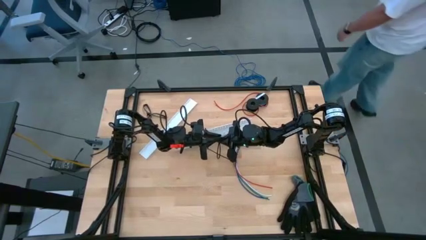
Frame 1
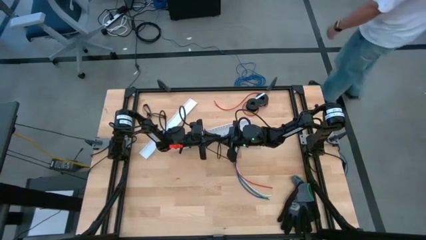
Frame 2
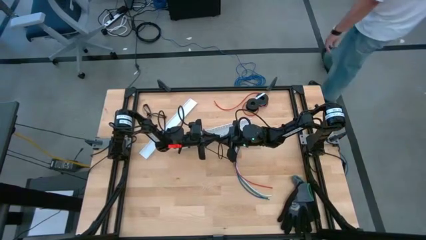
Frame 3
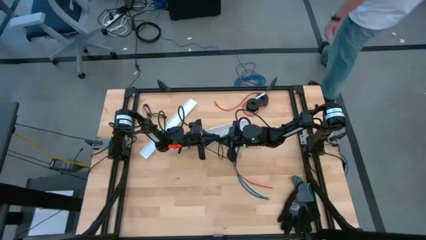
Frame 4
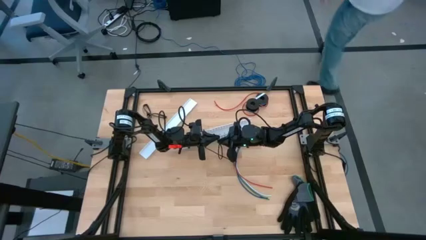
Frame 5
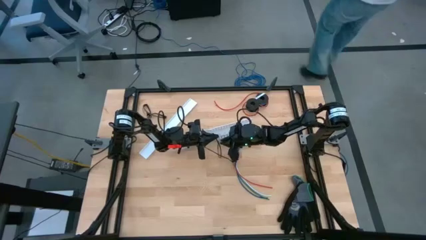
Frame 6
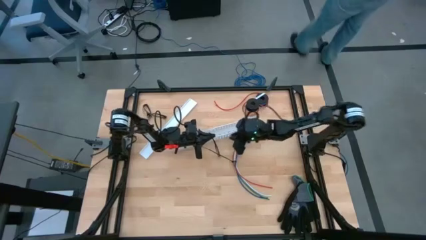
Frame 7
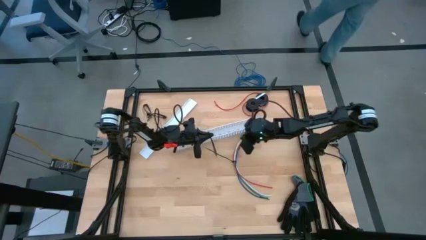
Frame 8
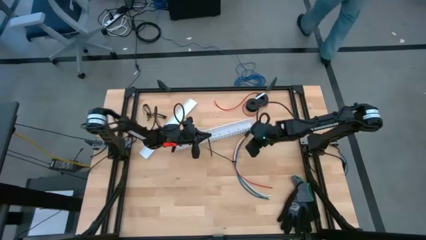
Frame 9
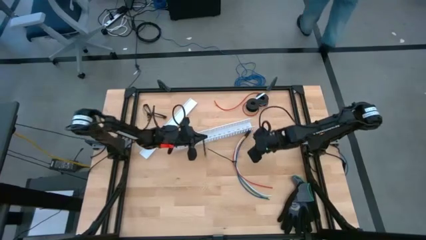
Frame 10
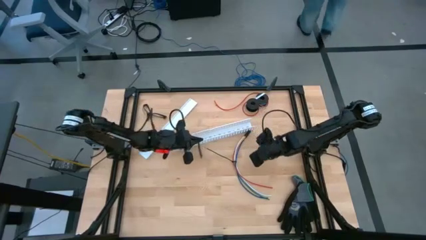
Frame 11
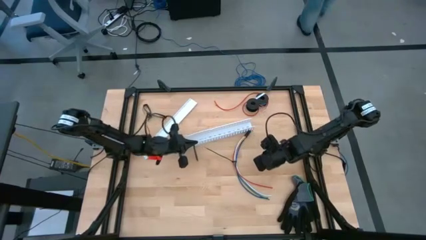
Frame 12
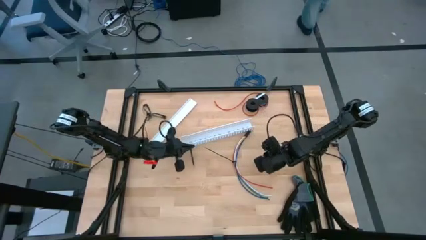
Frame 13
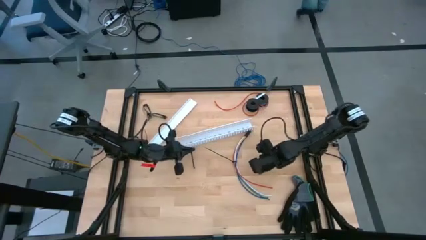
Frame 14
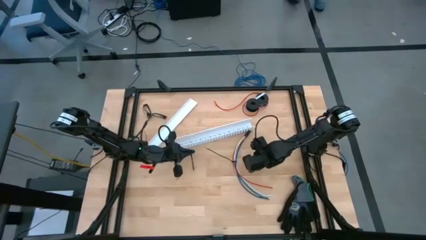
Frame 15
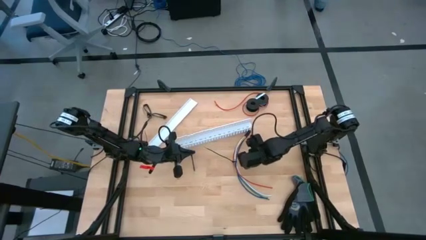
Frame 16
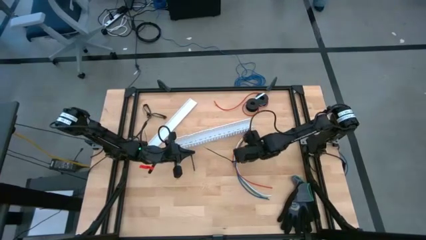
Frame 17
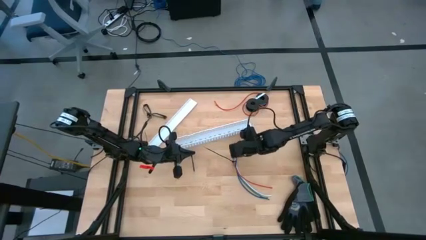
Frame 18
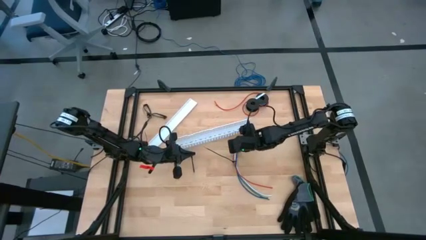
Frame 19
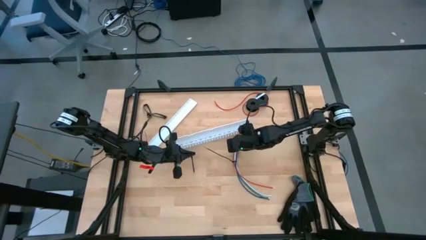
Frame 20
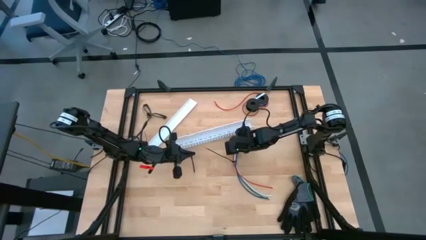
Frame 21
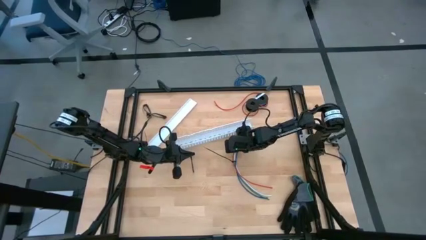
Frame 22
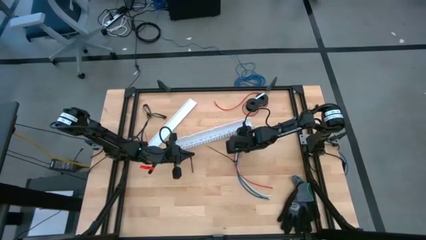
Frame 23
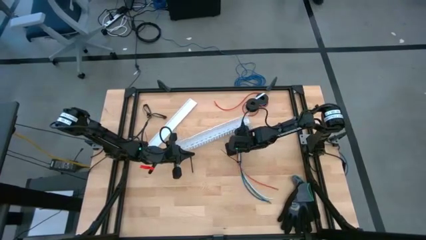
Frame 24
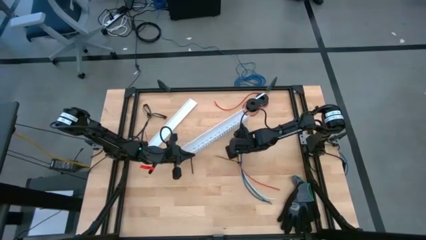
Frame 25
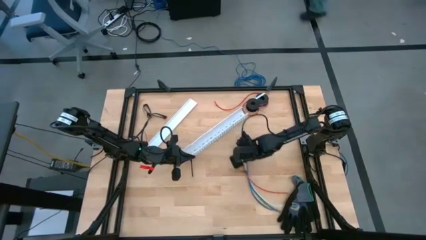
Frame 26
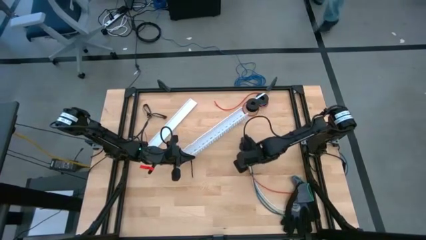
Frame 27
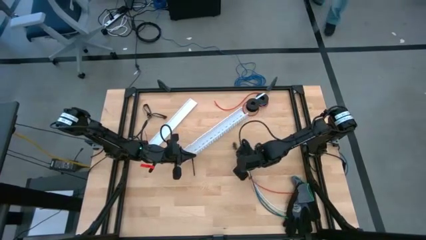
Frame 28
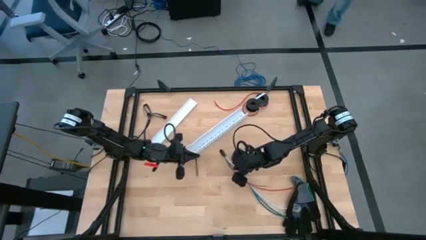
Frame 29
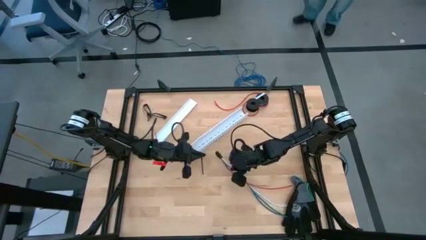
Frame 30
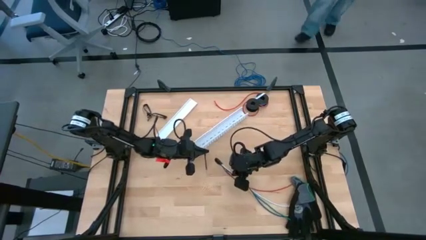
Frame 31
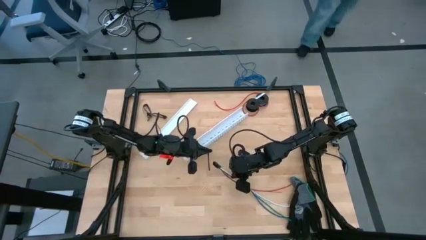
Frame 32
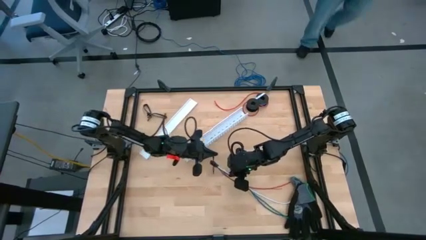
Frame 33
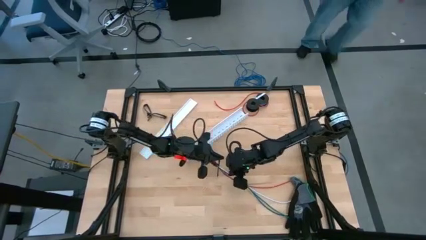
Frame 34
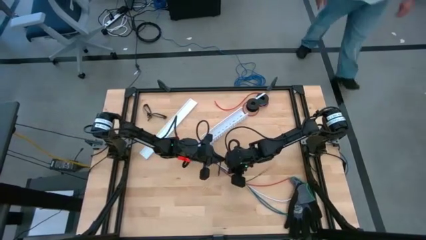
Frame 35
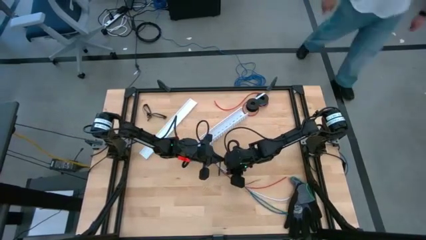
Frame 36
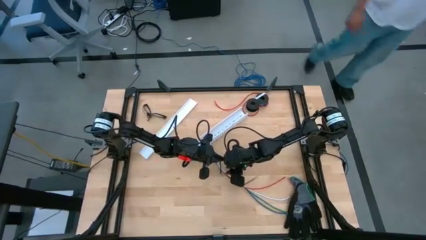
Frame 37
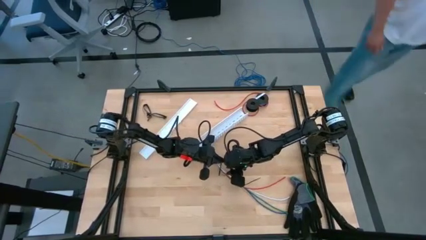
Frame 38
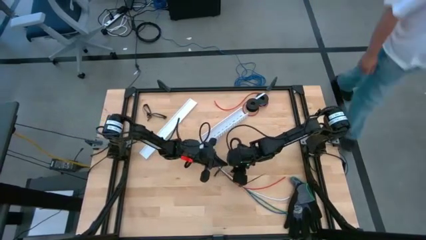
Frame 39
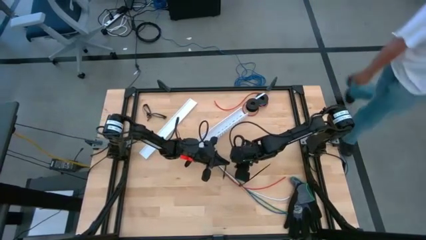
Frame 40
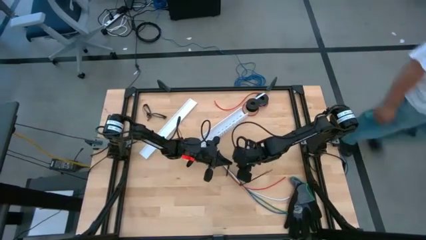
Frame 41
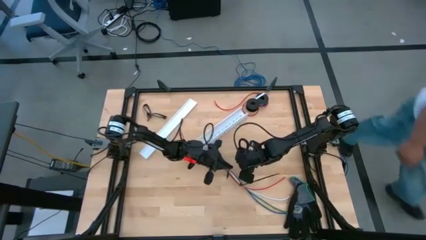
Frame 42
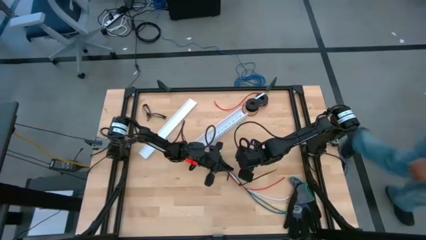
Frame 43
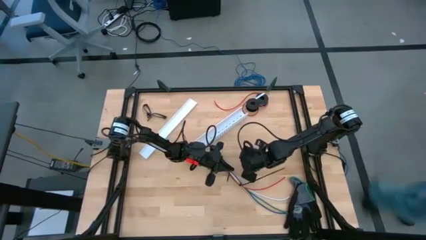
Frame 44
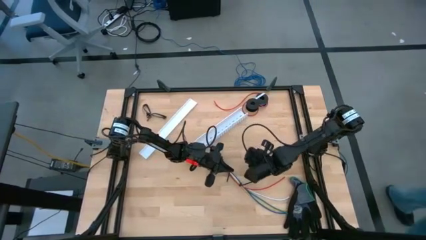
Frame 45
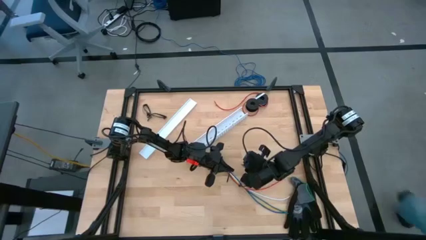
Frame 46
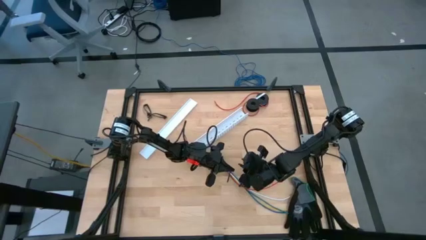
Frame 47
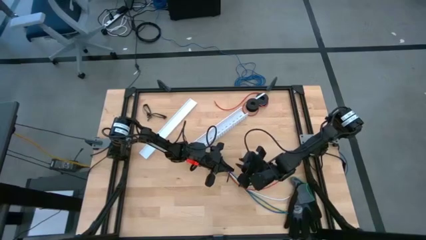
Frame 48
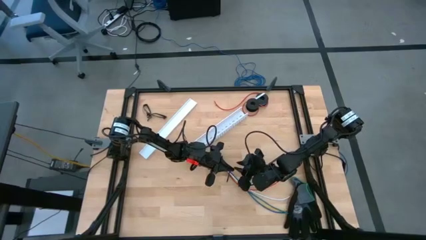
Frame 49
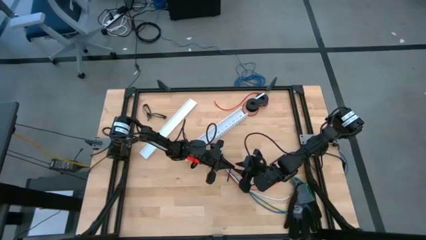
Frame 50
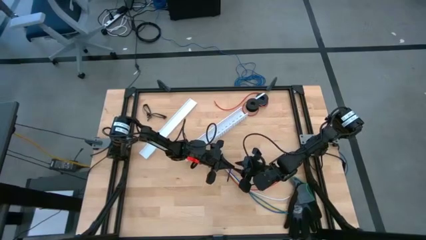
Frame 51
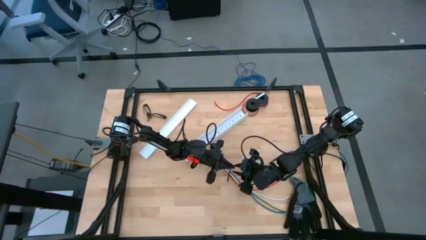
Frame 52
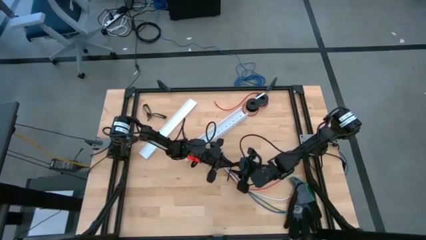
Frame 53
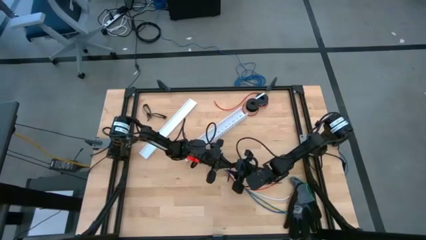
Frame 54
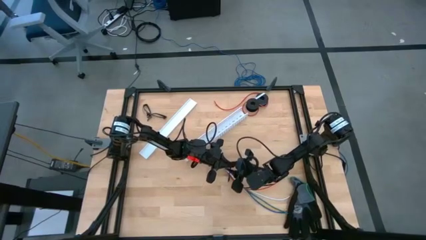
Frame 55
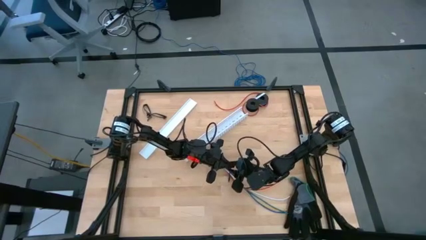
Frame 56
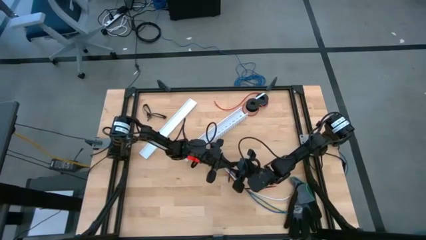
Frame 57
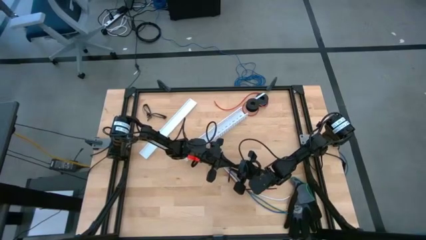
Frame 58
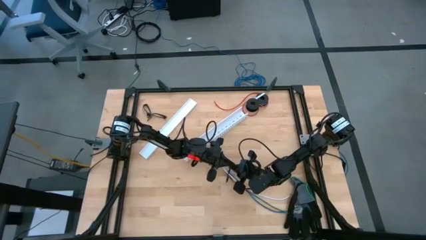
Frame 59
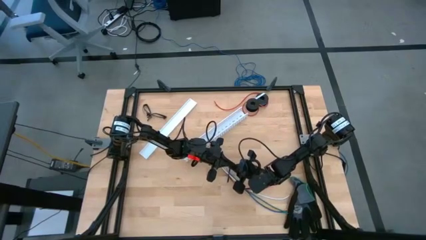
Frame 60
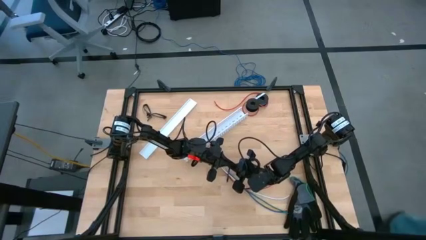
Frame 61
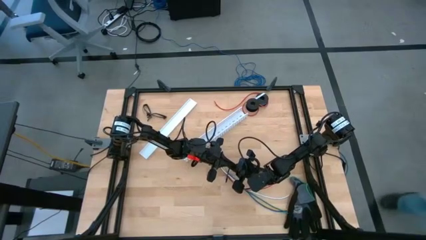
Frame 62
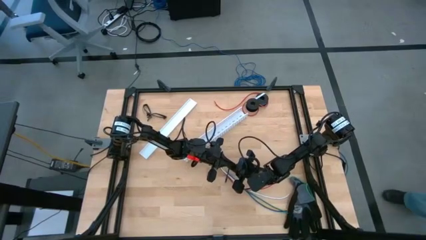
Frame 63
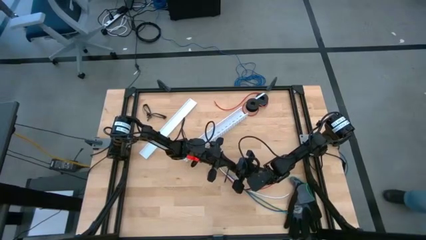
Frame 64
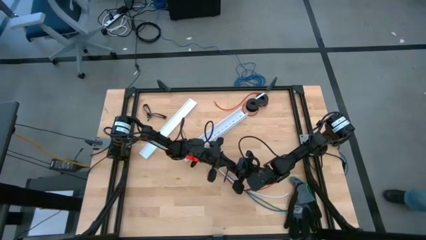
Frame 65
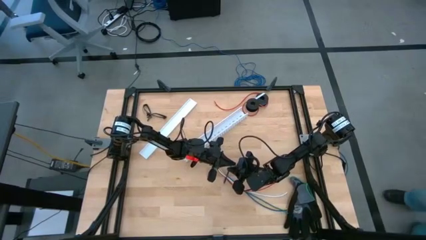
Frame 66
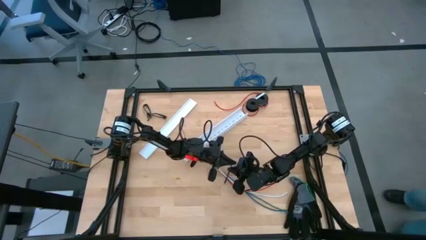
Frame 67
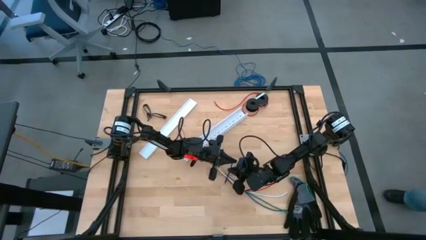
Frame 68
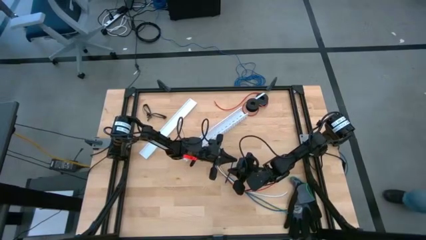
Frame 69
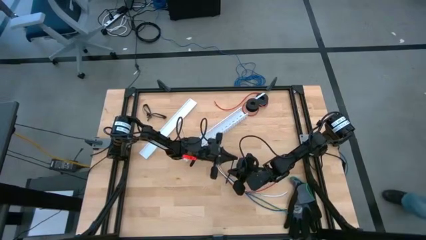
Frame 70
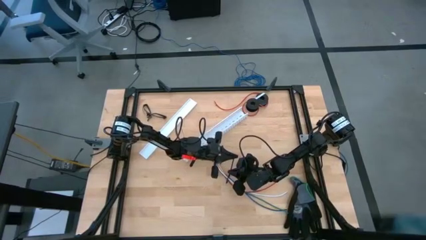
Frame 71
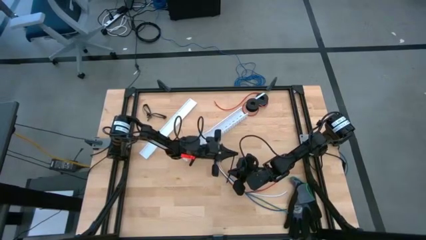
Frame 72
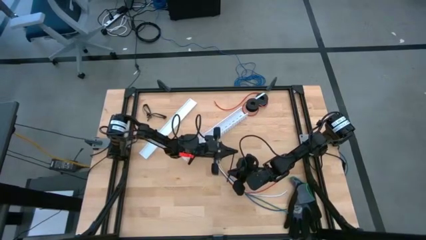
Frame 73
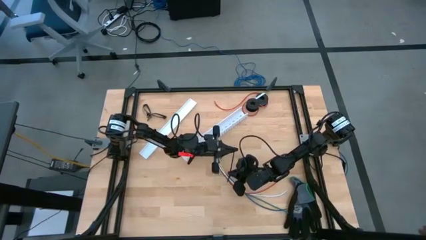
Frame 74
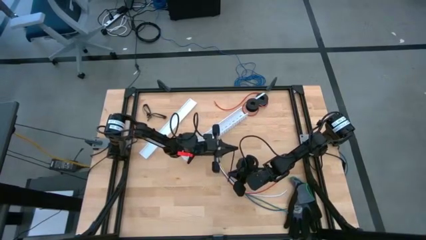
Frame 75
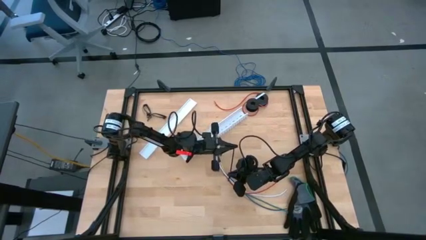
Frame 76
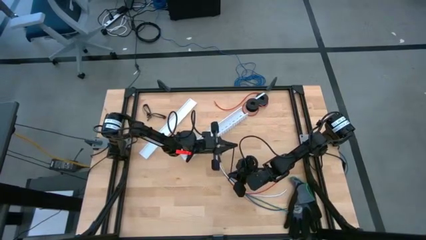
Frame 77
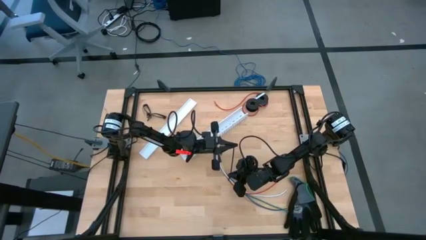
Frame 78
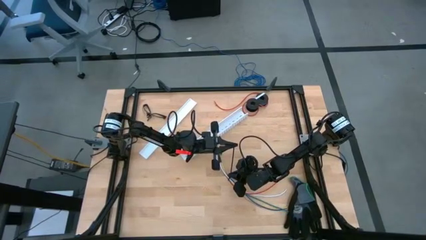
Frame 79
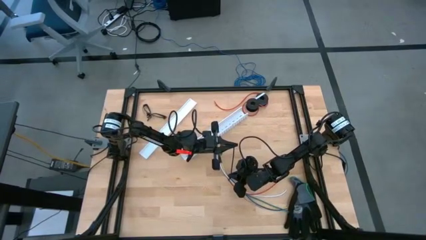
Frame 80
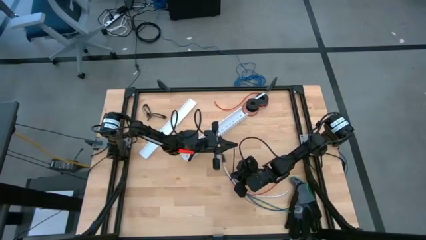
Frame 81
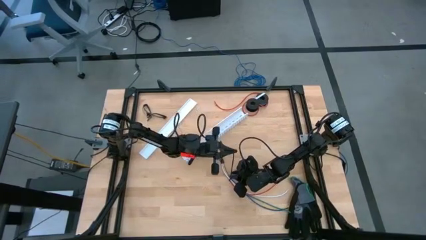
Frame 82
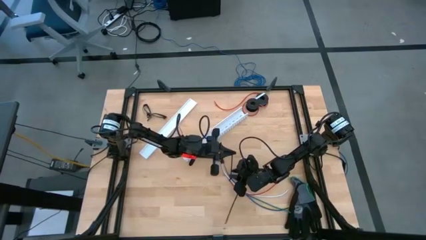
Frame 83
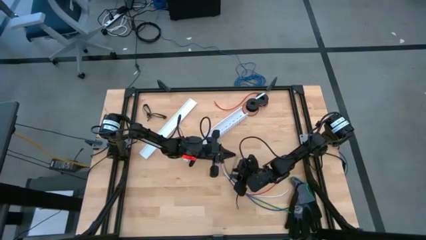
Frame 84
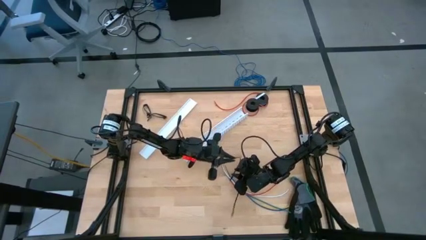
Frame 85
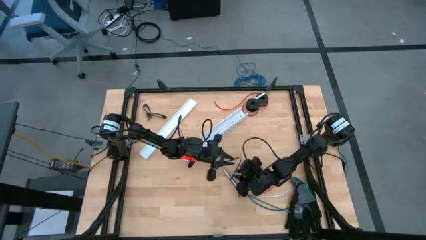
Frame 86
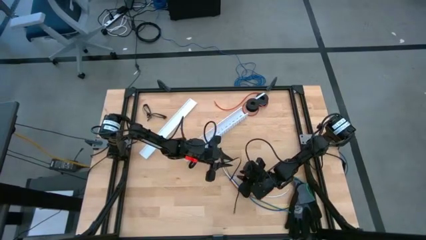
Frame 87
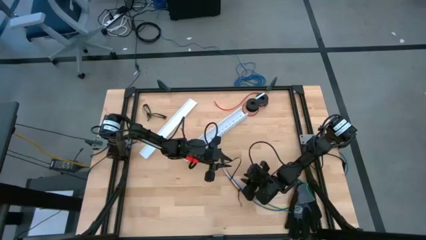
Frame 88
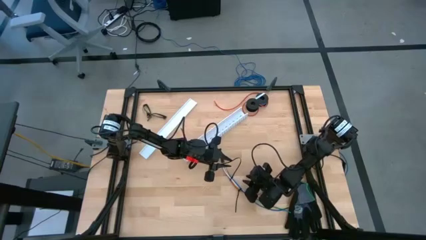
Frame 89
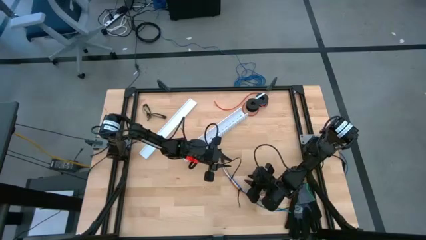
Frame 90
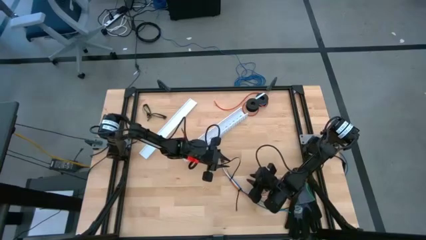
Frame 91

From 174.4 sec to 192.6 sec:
Task: Ziptie cables
Wrap the cables together using the black zip tie
